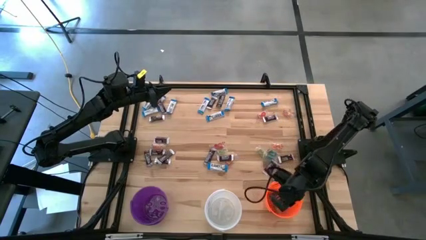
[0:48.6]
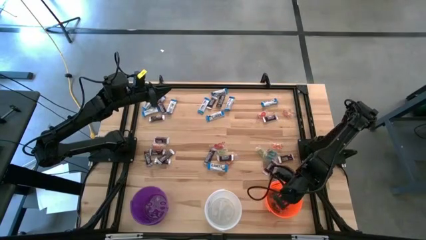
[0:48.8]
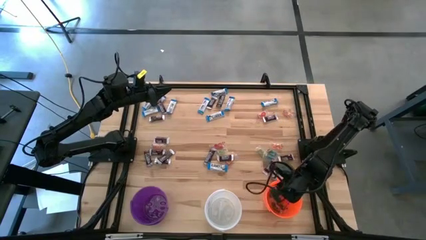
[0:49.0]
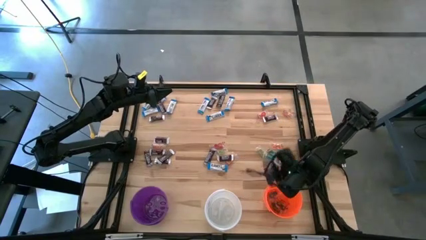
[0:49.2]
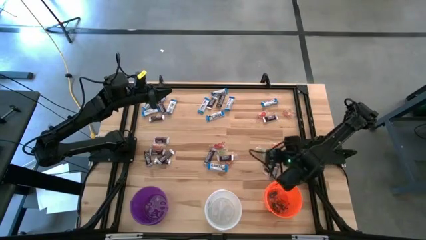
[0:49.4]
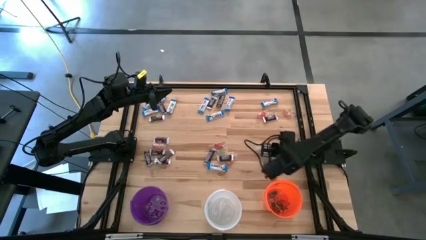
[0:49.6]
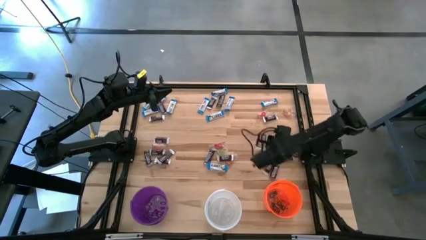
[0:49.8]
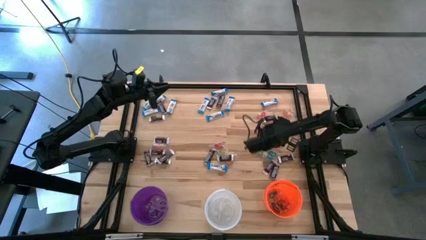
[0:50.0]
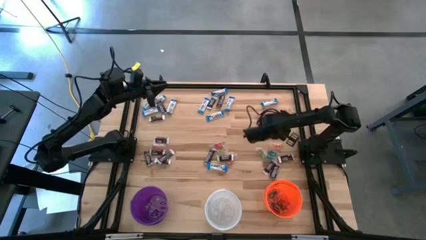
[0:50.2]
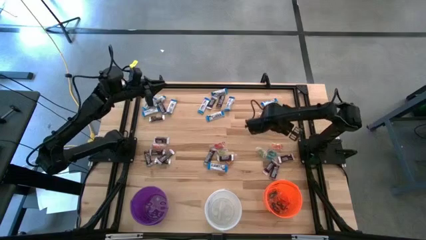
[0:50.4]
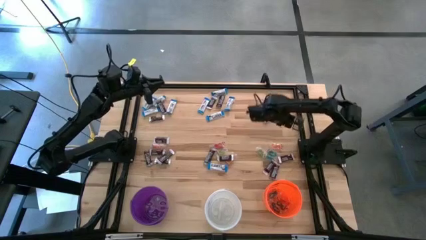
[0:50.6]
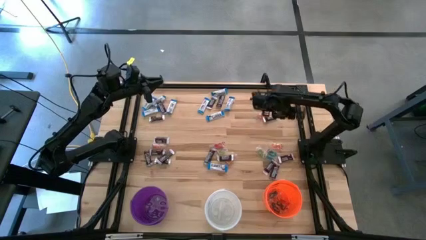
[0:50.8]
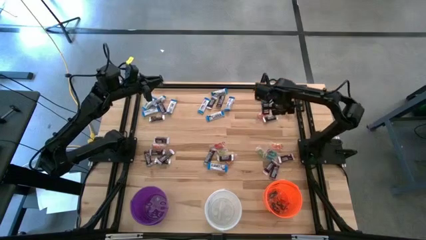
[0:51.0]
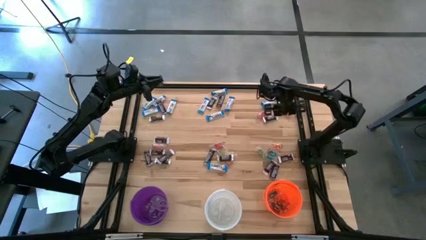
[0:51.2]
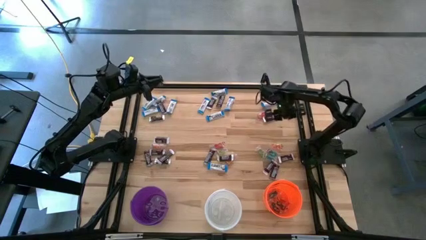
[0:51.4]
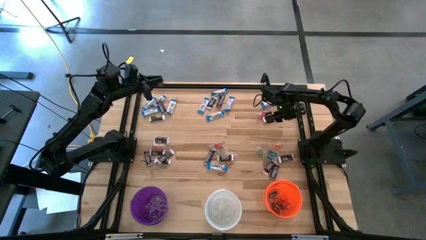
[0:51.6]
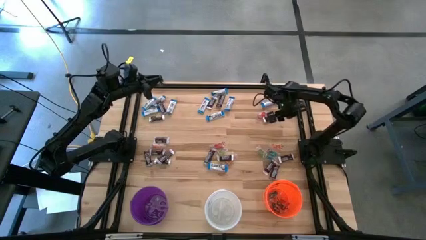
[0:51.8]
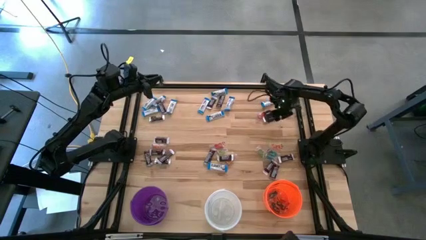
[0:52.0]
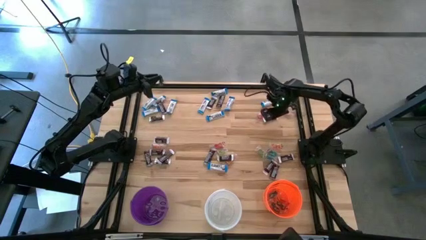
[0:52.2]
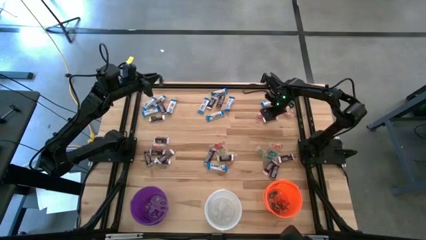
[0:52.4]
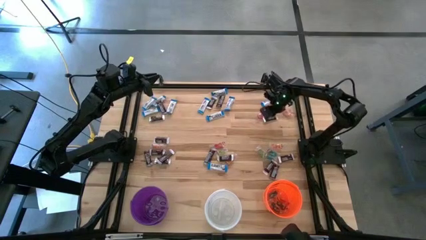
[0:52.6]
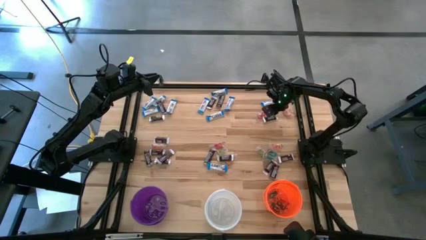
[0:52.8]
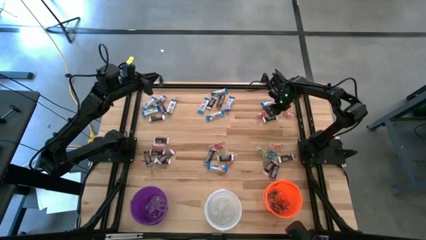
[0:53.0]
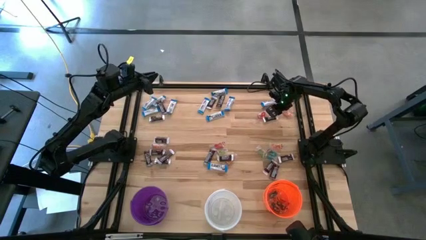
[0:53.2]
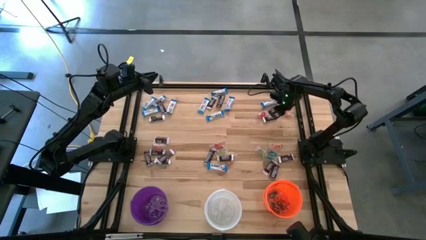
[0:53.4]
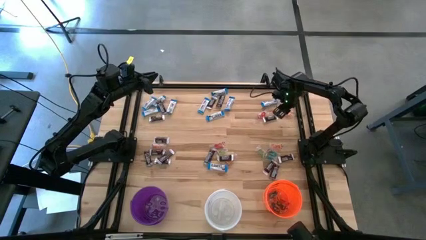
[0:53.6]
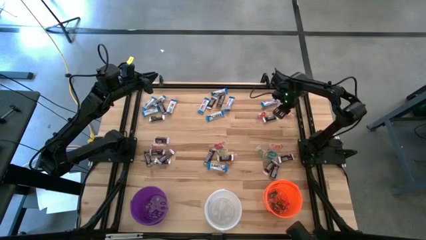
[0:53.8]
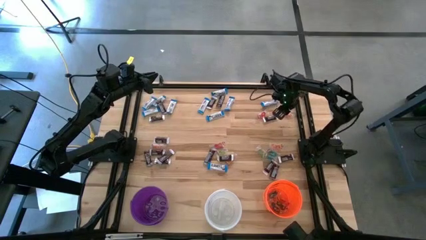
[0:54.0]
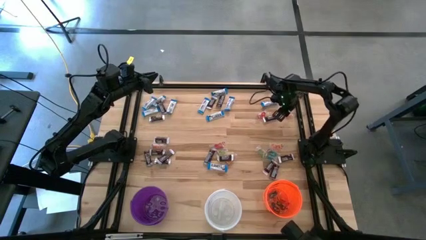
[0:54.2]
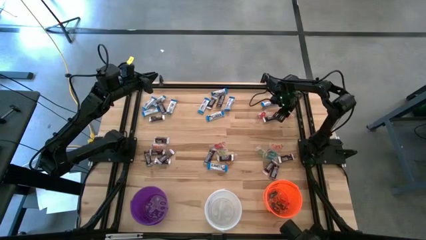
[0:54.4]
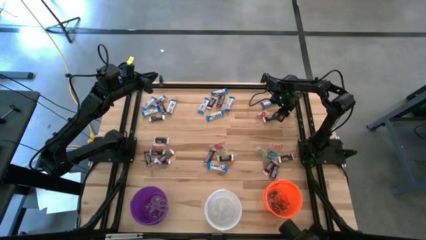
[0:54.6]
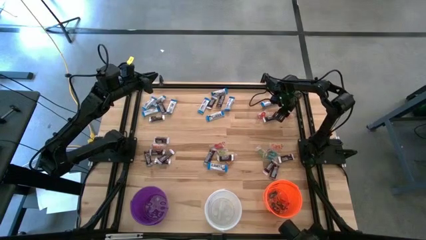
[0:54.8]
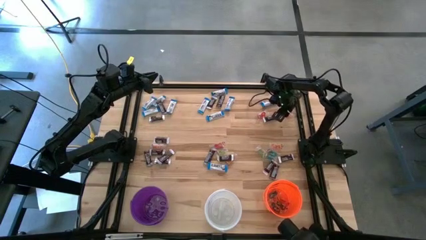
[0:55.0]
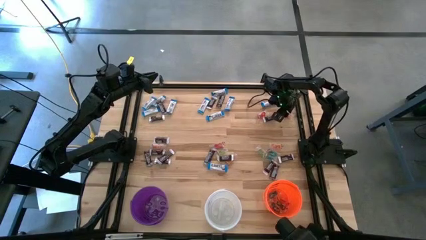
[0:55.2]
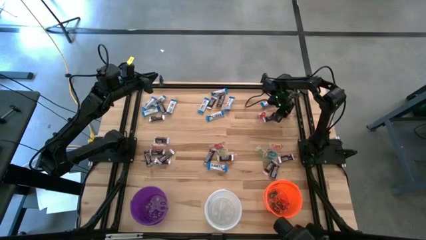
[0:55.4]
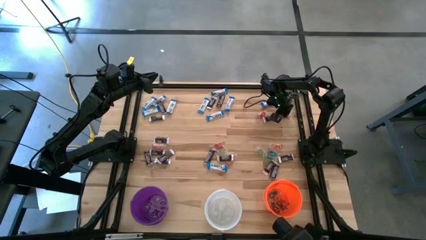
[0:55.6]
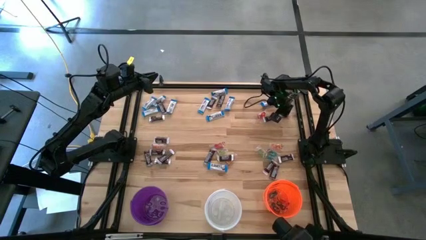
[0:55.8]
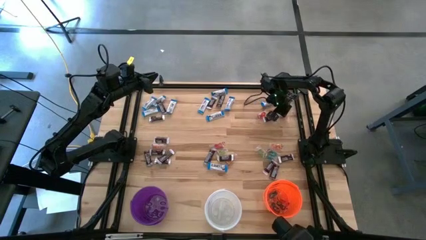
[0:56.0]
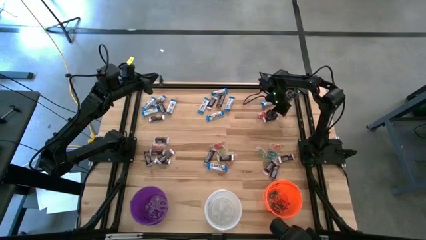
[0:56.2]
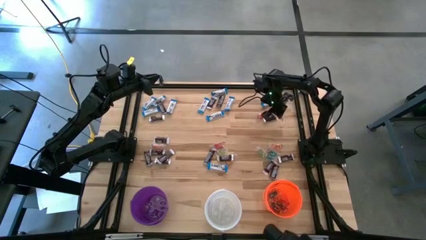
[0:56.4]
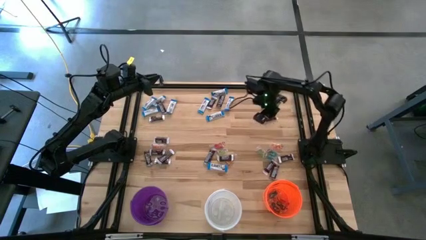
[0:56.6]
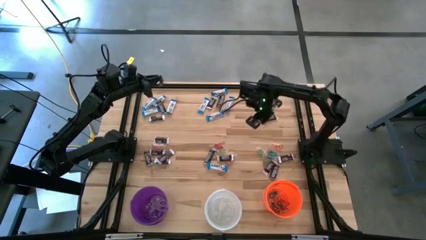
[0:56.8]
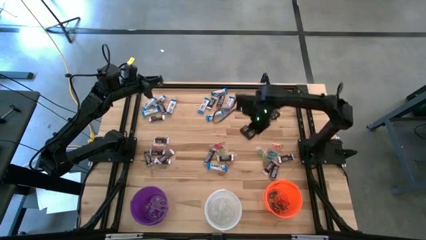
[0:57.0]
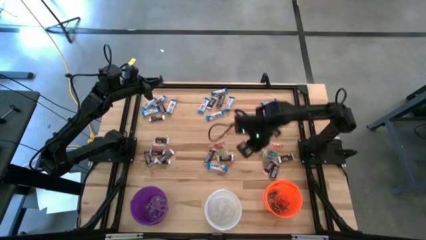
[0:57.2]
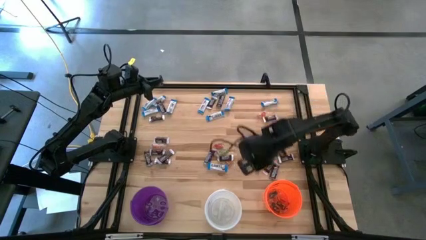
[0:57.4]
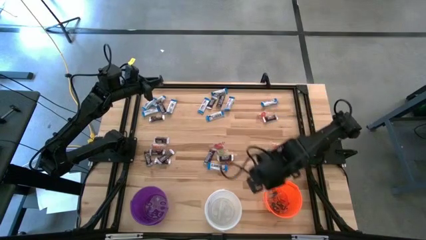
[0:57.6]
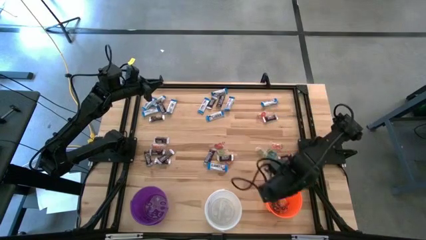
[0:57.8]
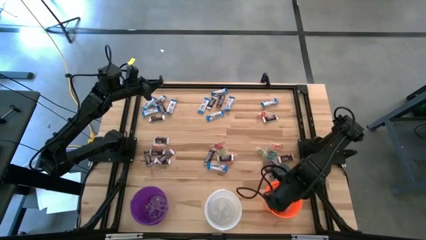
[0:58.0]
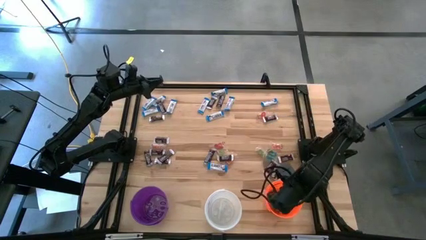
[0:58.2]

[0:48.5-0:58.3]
Task: Sort candy
Put the orange gummy into the orange bucket

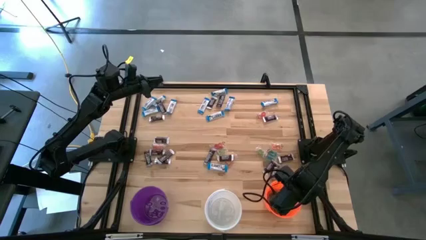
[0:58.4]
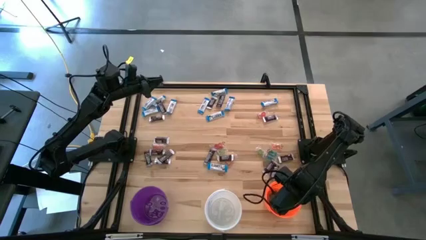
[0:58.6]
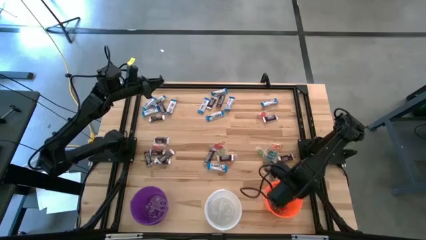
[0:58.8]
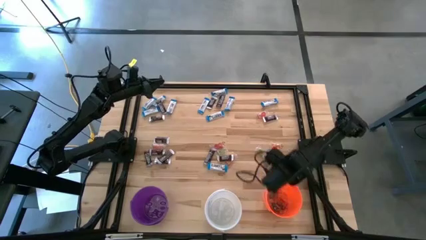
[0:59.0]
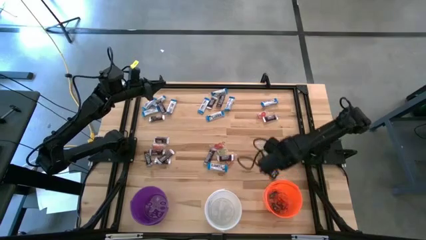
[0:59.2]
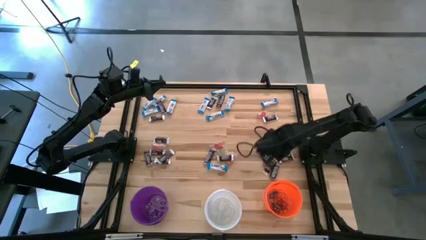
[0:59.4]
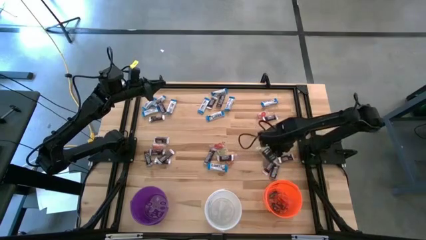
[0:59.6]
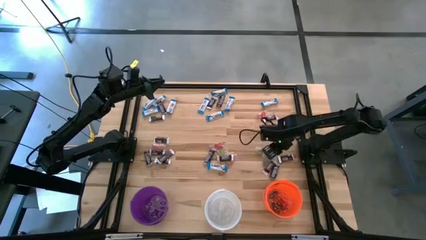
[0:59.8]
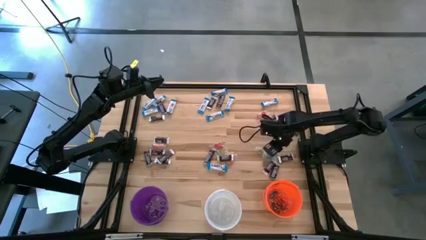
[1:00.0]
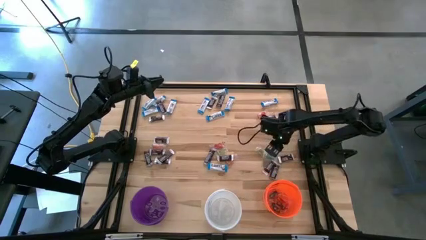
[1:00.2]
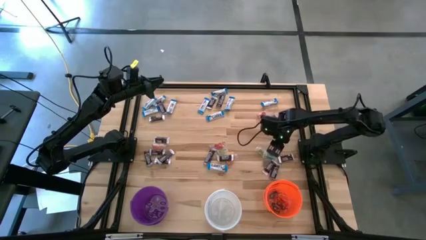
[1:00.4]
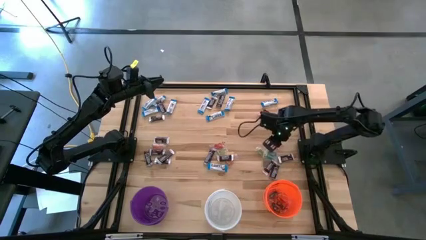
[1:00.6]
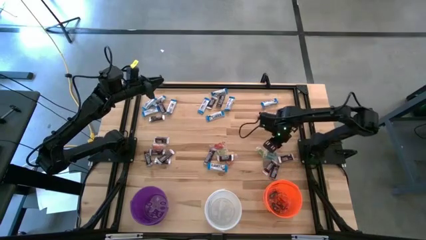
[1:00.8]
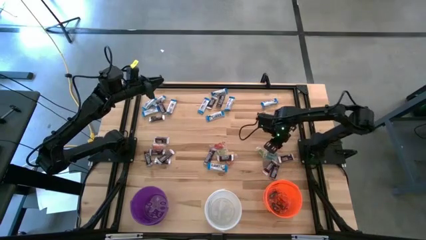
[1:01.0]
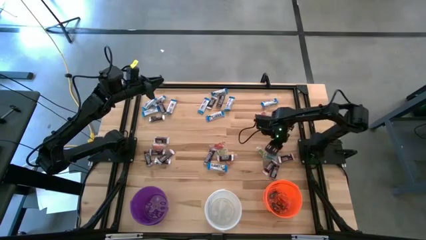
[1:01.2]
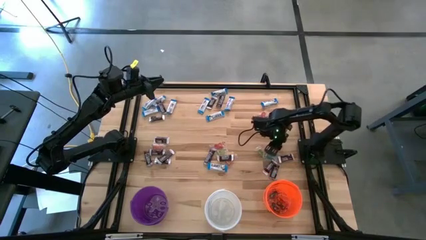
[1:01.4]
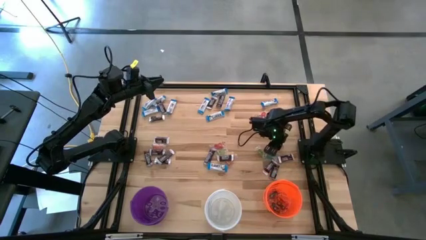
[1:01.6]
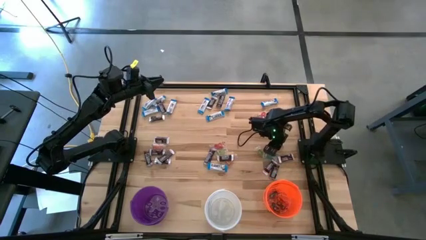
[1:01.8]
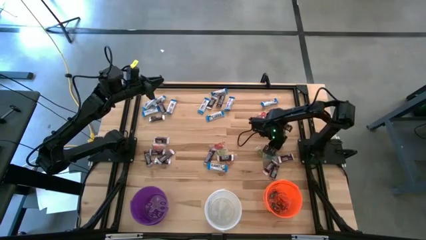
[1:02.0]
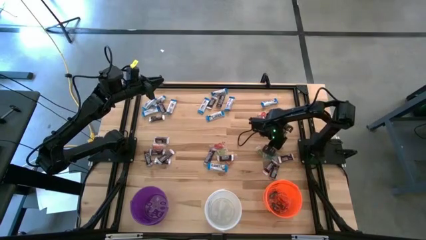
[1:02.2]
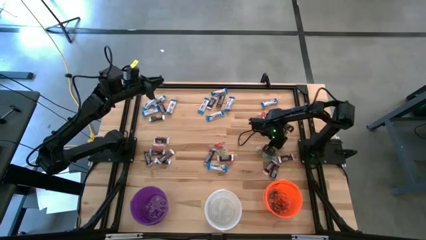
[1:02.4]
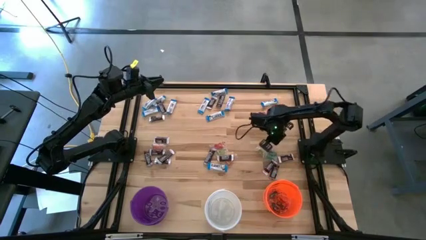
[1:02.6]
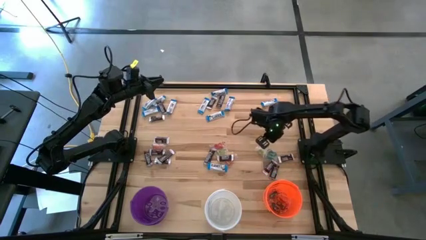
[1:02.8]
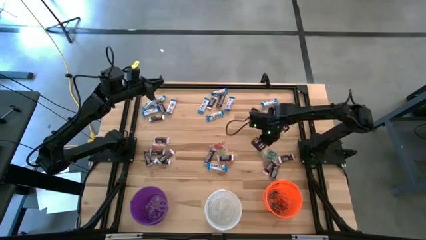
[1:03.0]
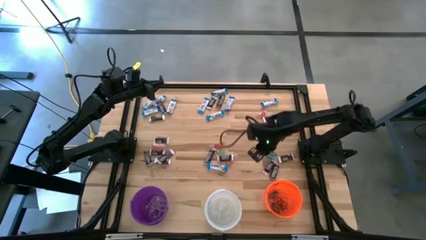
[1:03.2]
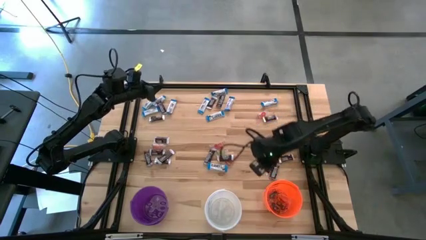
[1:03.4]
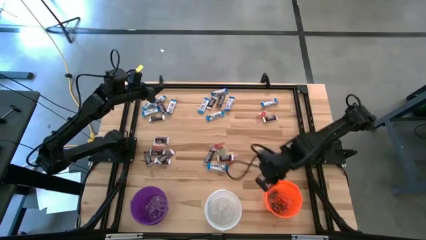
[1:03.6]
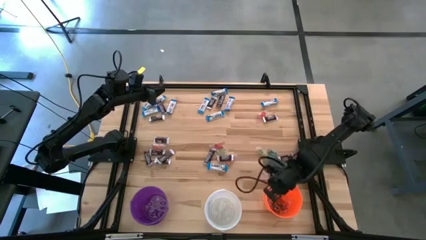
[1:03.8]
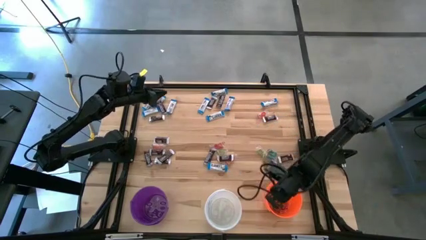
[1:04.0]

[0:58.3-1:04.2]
Put the orange gummy into the orange bucket
